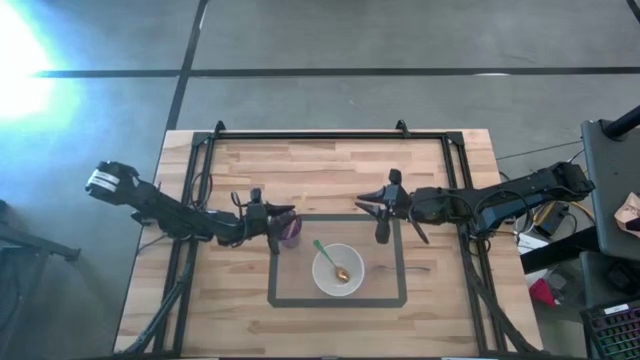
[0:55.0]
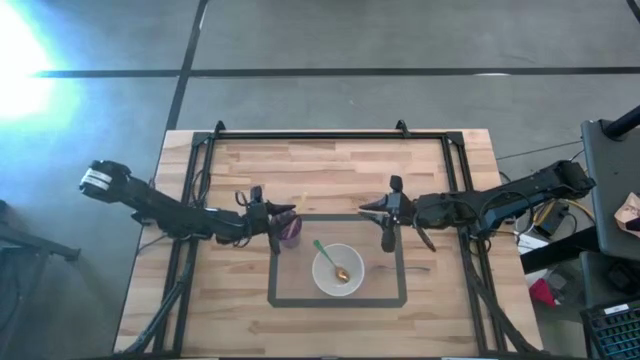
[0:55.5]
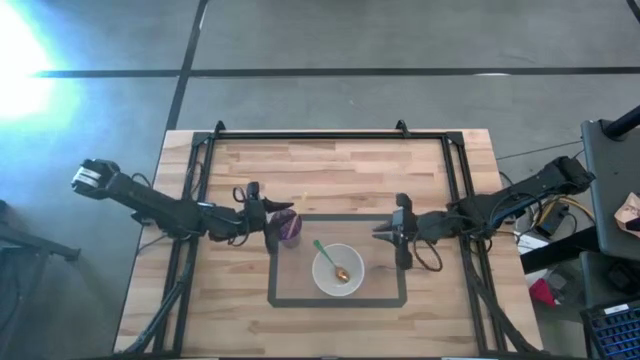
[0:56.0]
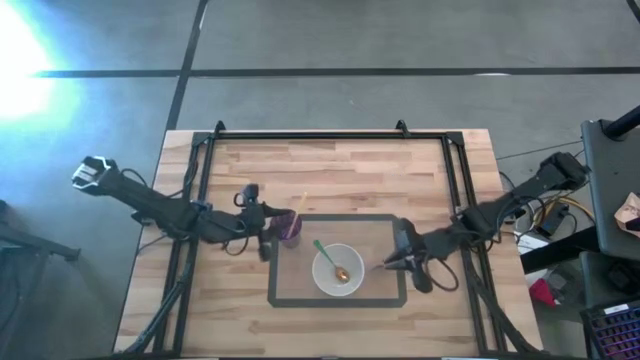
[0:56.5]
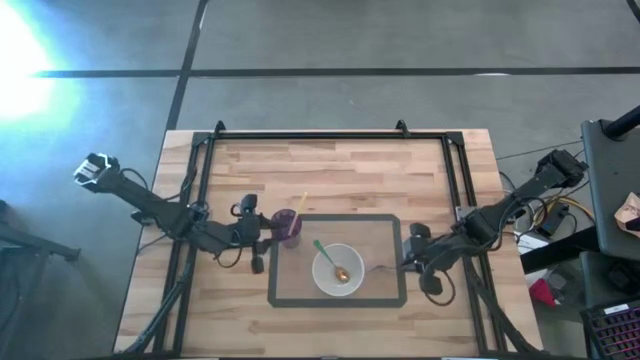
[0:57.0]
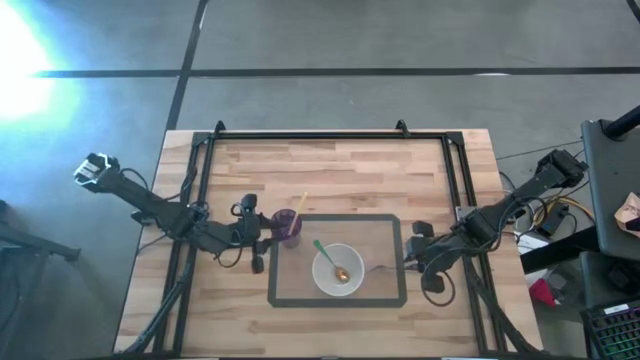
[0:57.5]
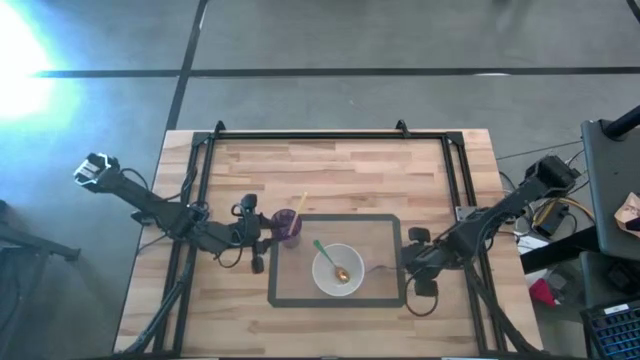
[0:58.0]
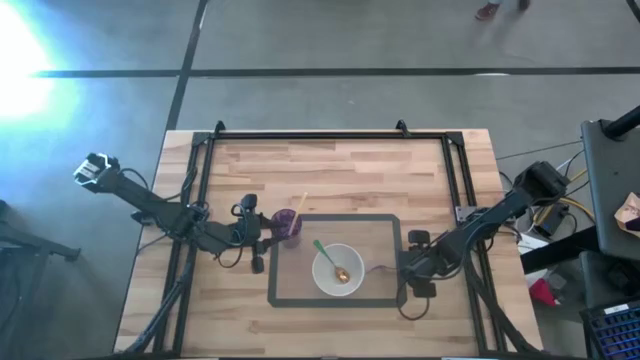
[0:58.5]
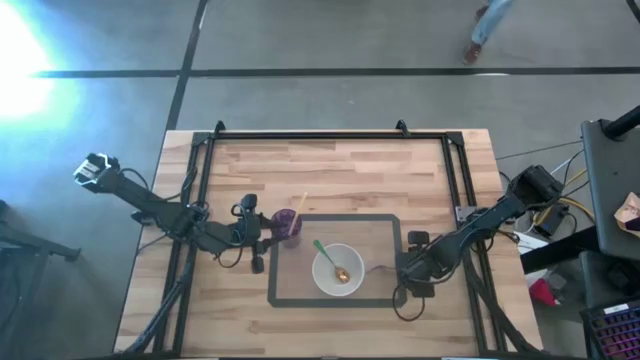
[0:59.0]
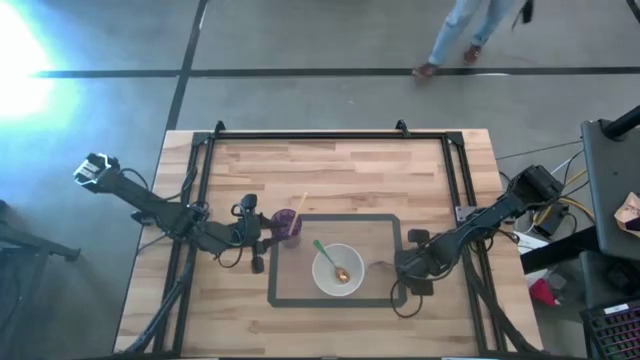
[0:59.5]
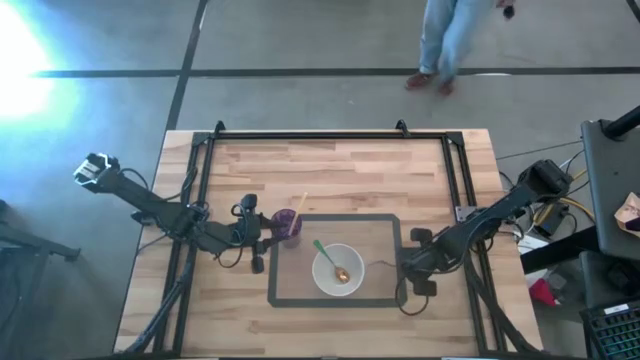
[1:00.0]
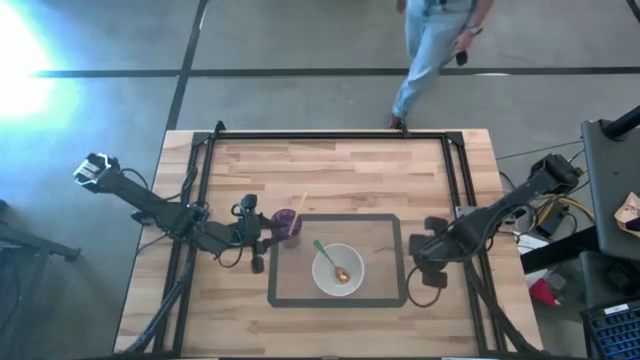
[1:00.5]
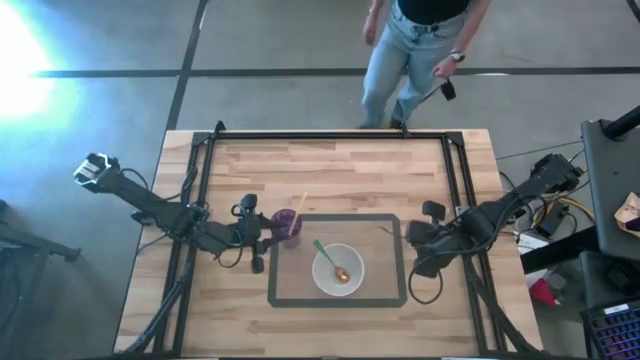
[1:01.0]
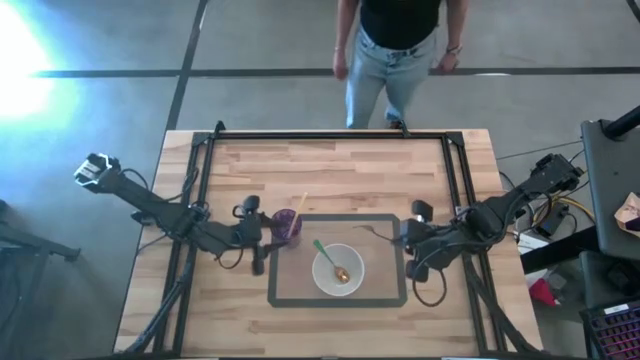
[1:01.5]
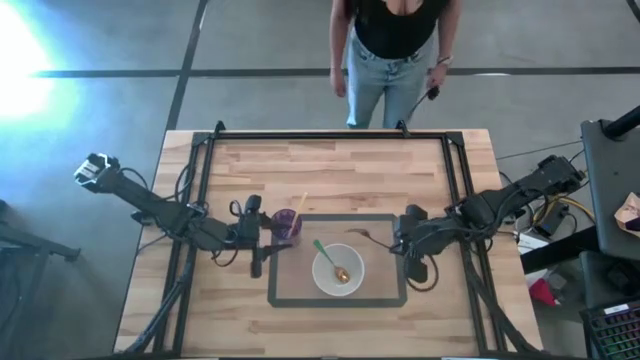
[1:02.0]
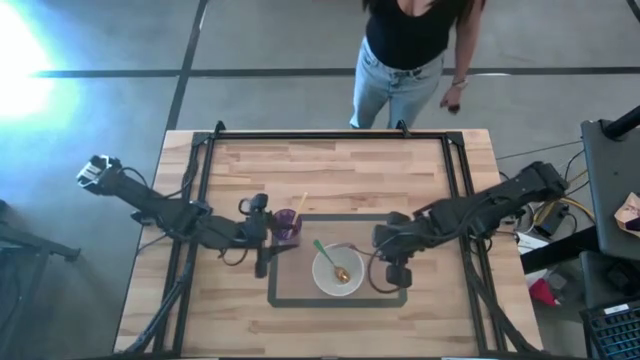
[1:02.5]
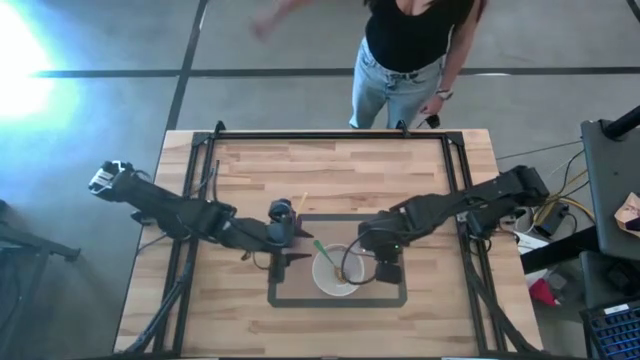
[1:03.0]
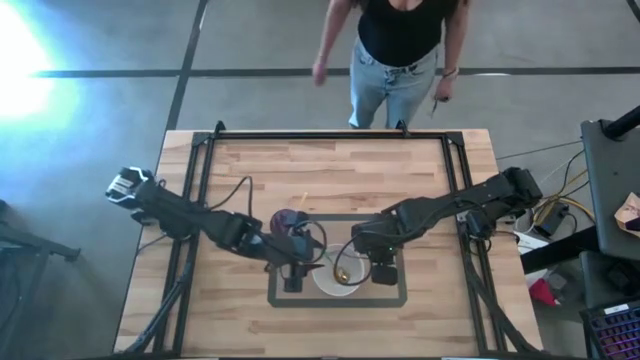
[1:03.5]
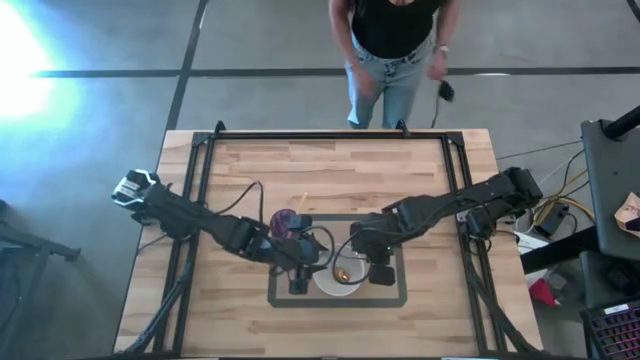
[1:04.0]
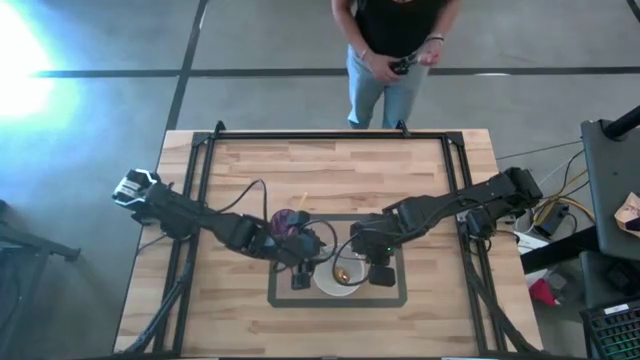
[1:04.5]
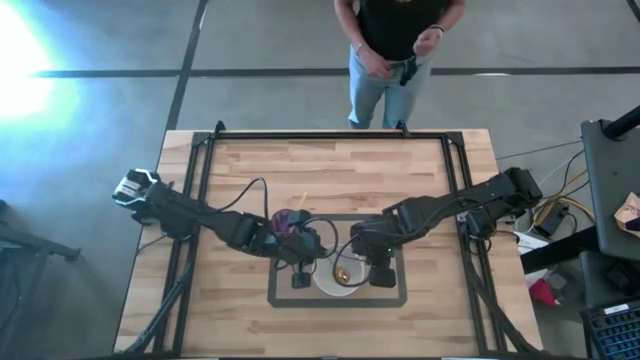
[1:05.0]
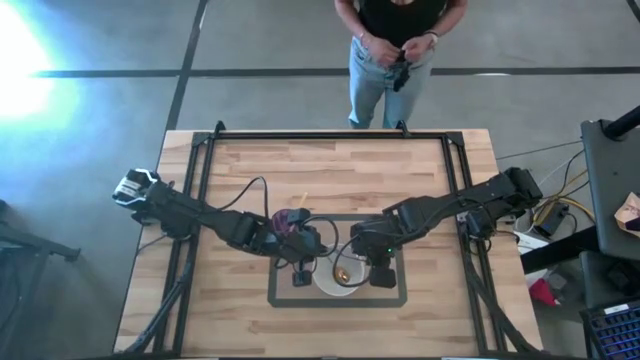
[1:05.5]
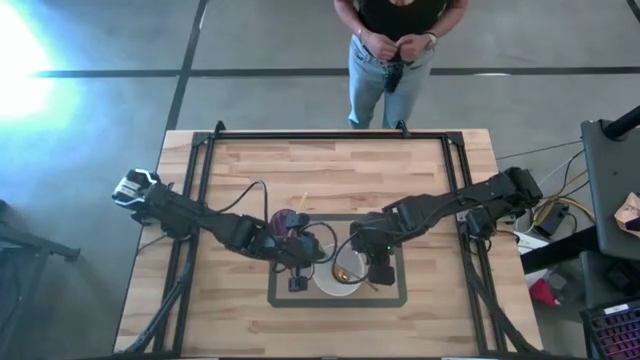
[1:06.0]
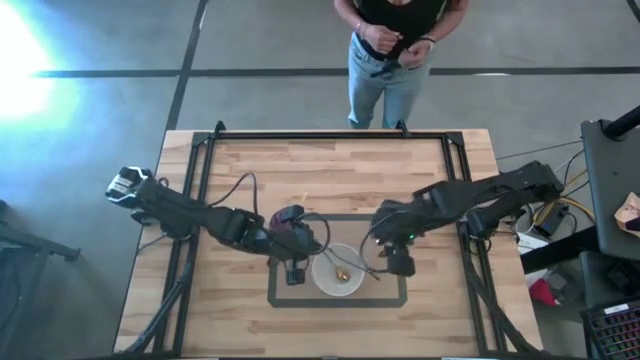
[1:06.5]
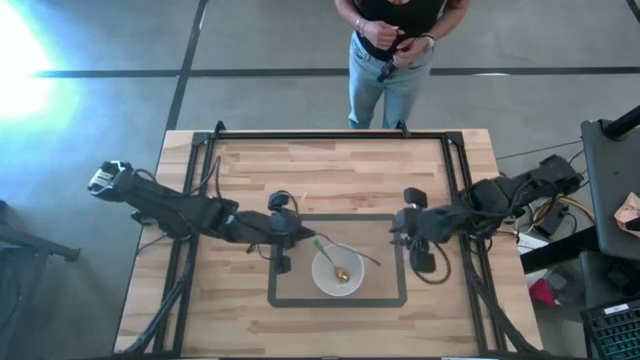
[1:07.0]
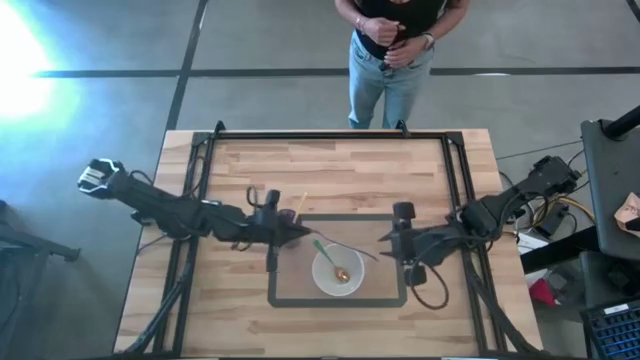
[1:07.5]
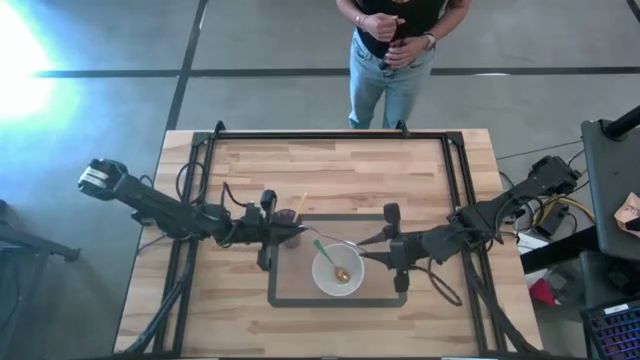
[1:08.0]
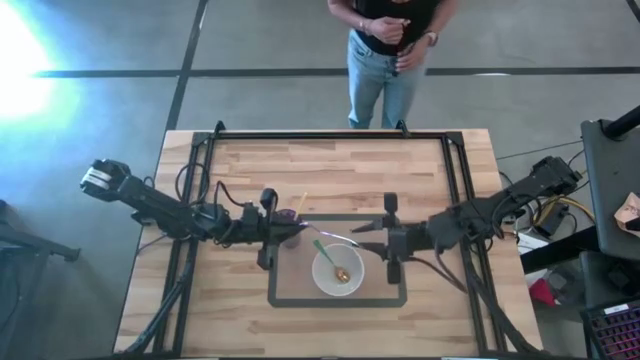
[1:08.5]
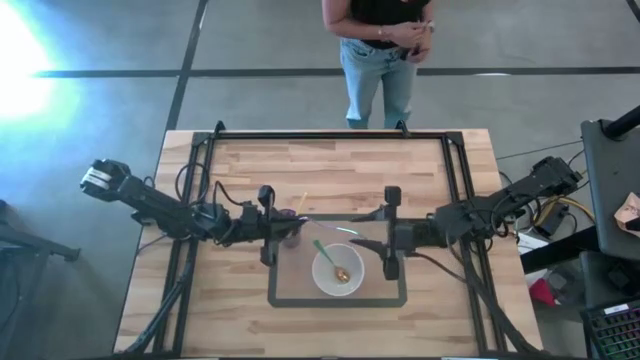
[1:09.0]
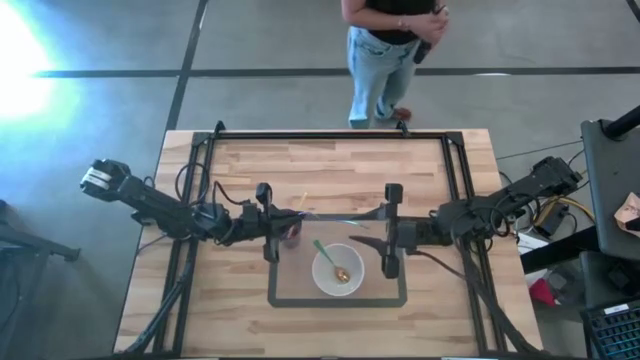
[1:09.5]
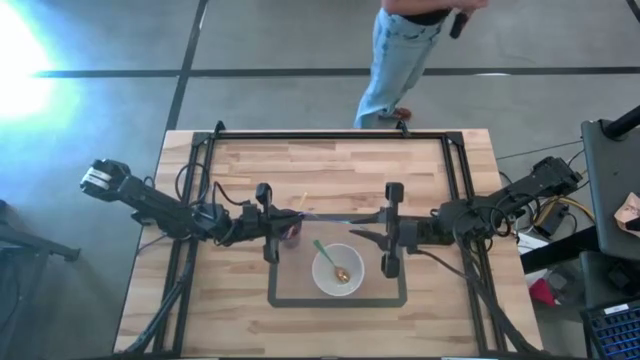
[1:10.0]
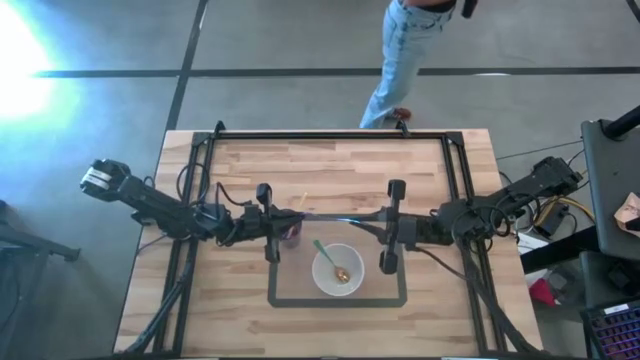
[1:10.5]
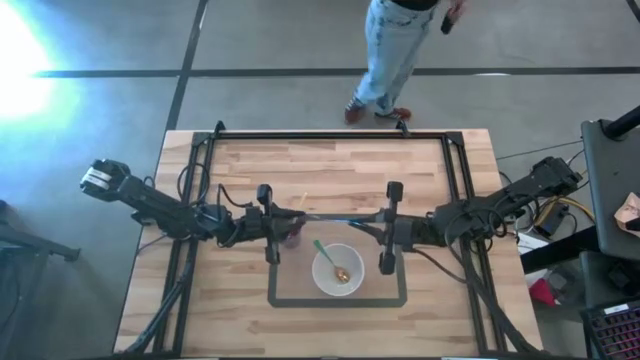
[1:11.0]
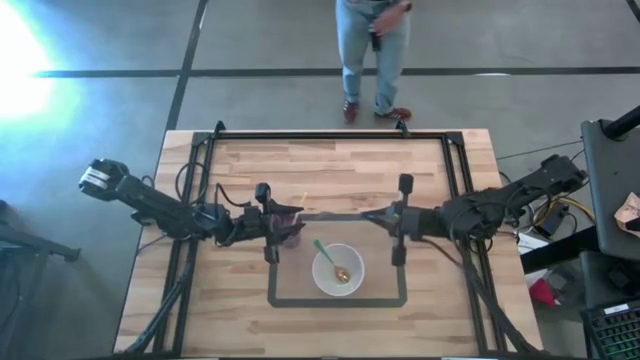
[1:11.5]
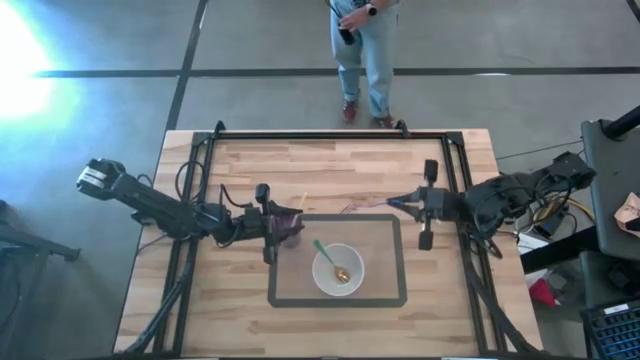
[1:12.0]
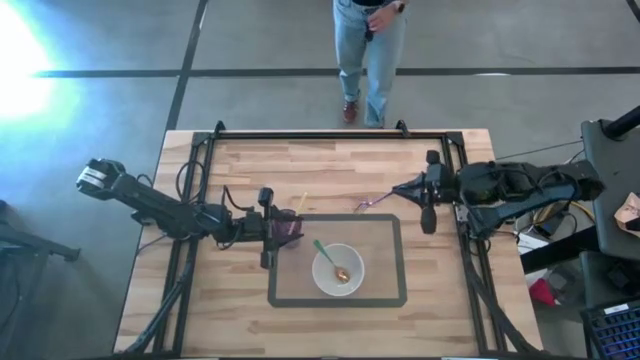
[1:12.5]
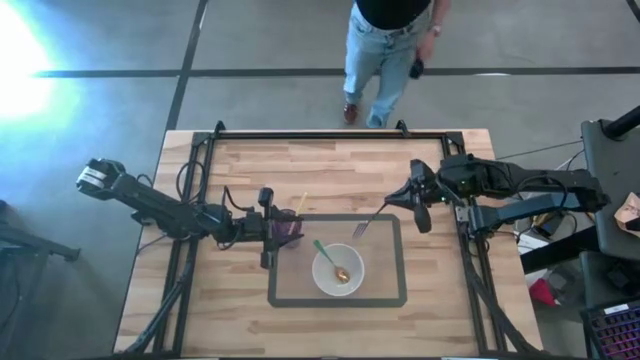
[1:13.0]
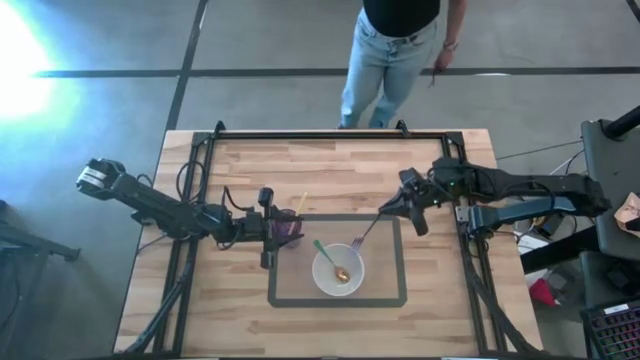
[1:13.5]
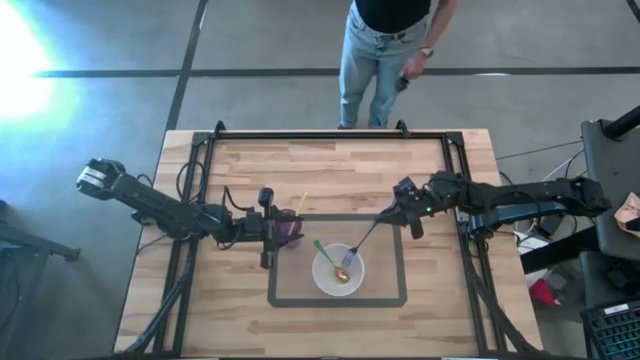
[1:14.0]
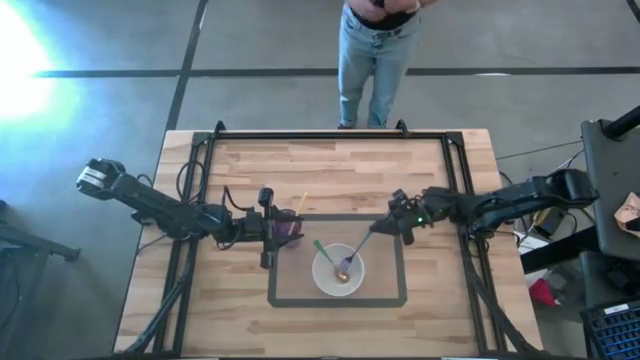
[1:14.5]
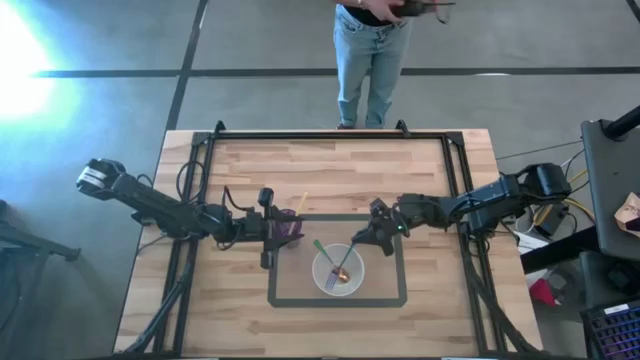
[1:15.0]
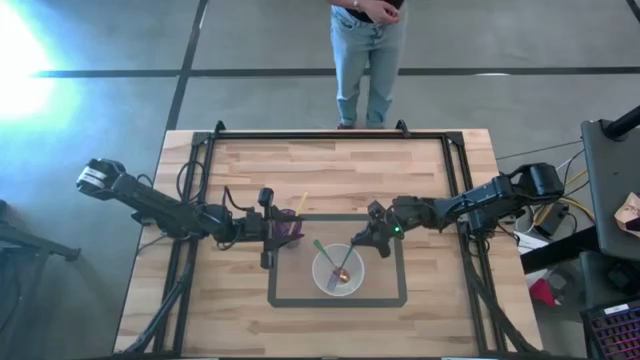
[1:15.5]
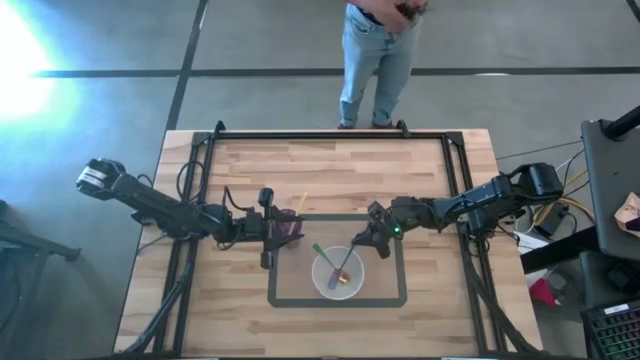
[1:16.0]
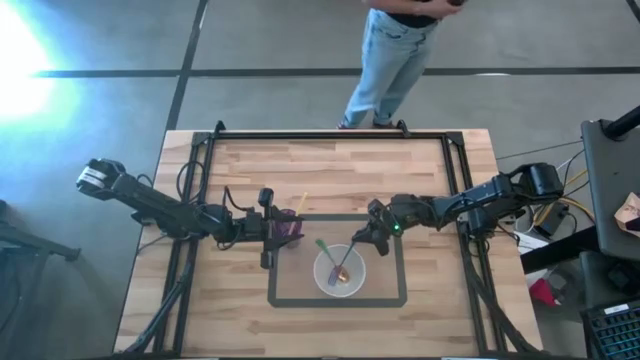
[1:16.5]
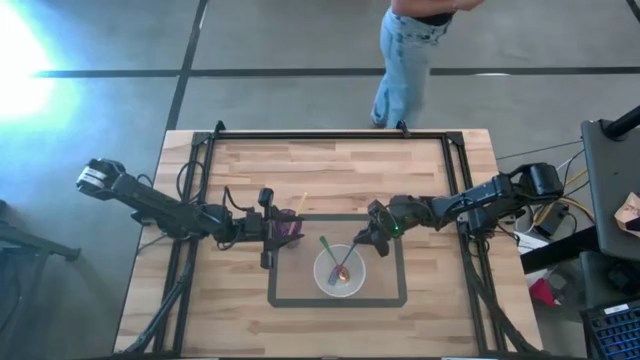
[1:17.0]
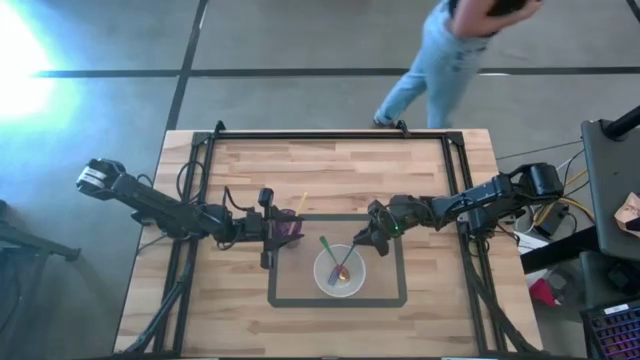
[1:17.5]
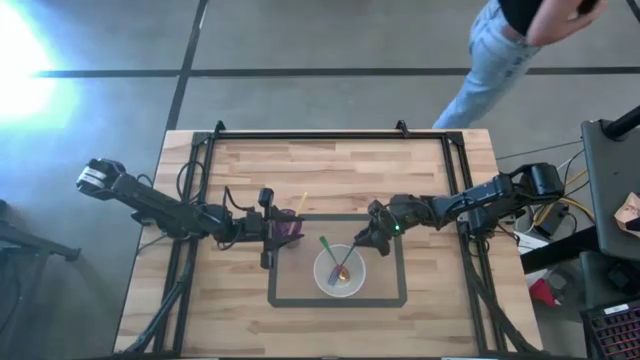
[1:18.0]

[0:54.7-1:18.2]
Task: Pick & Place Utensil
Put the purple fork into the white bowl on the transparent mat
